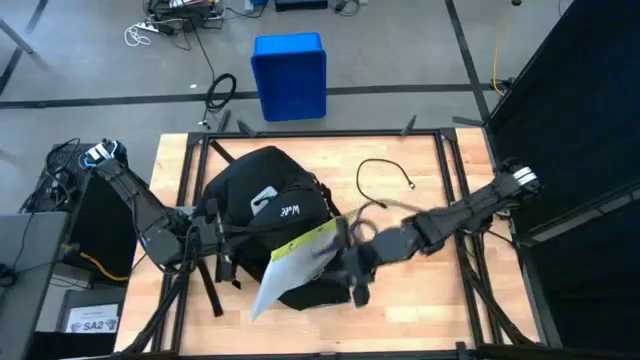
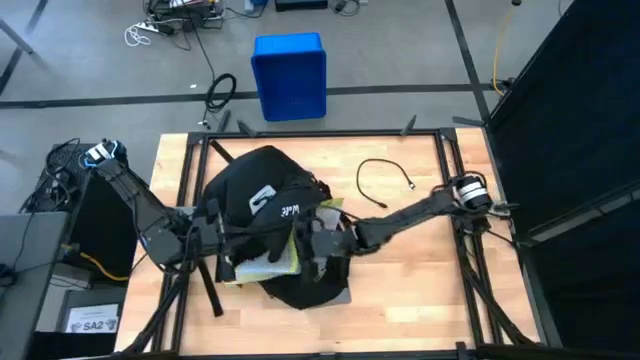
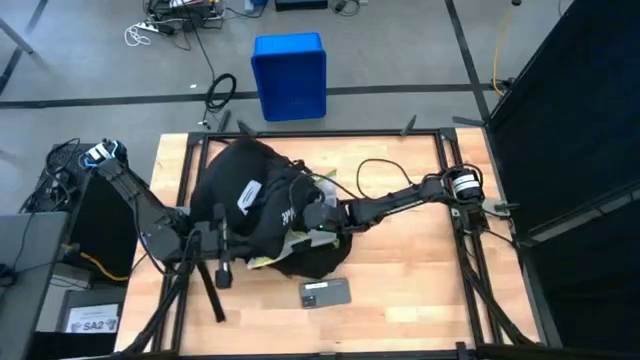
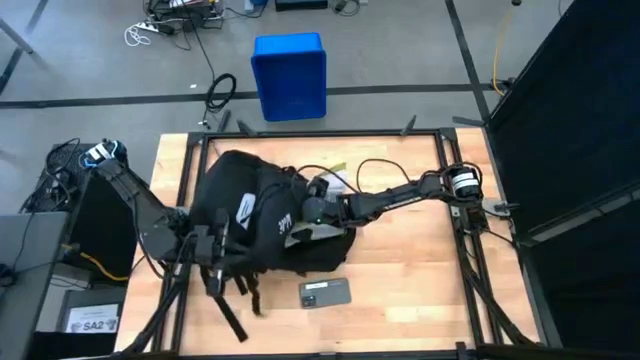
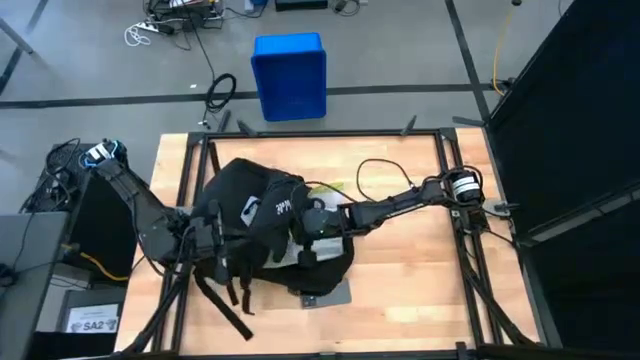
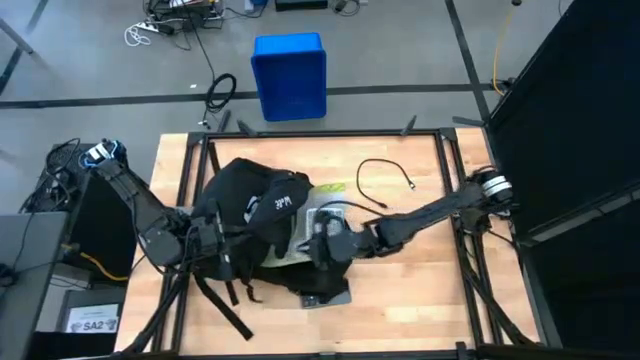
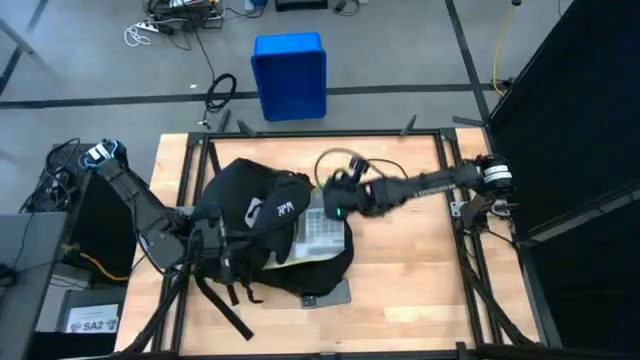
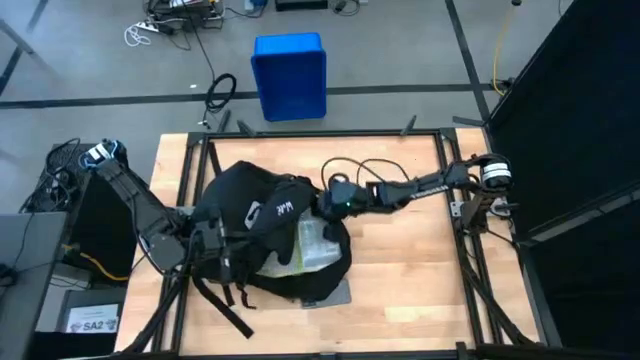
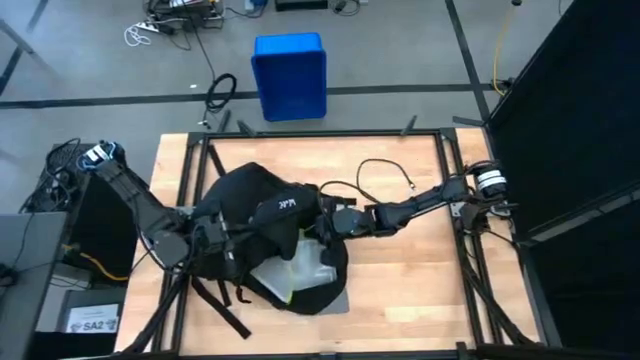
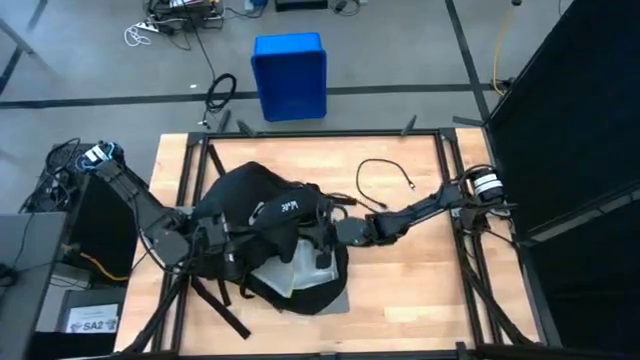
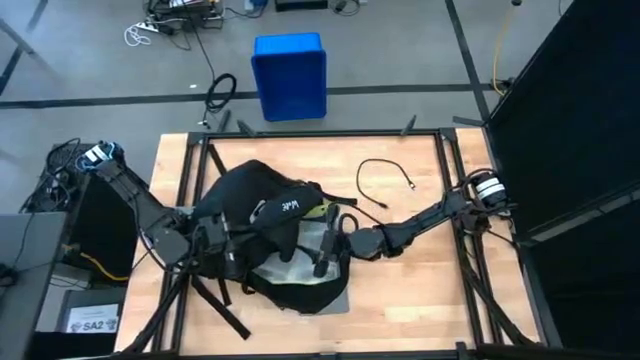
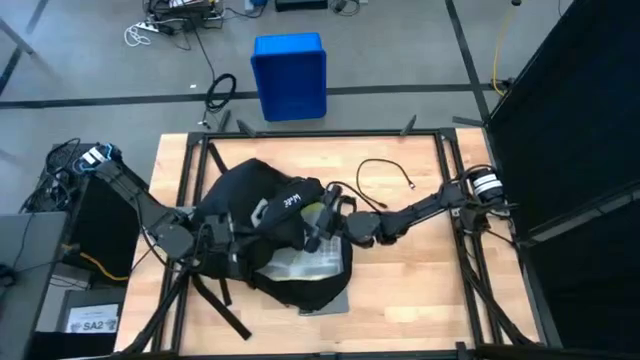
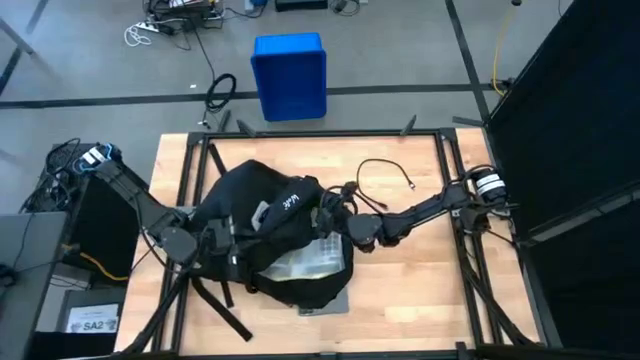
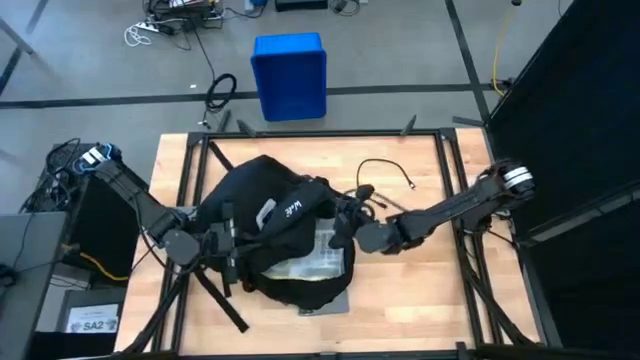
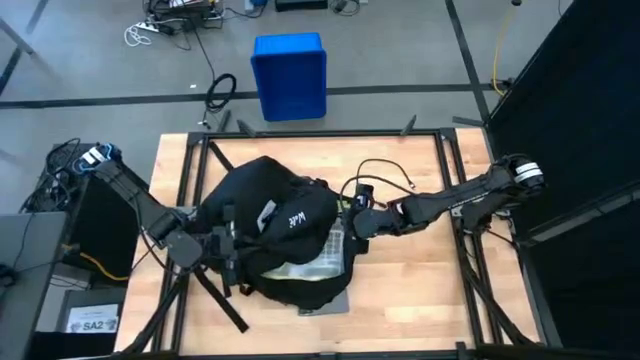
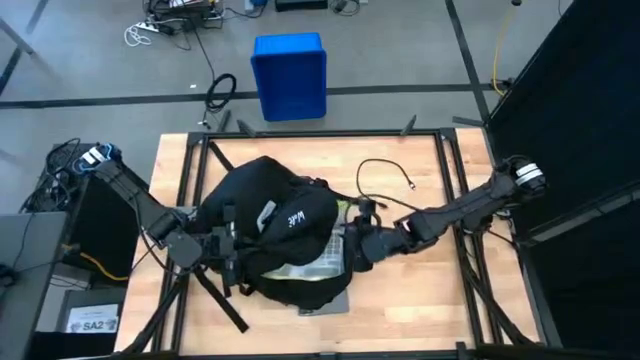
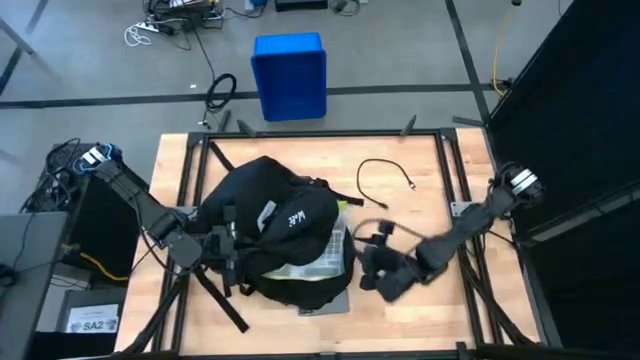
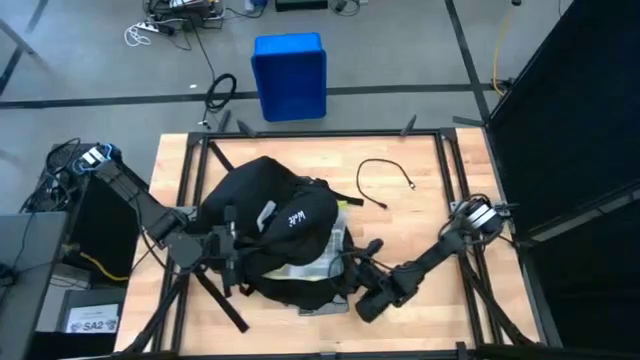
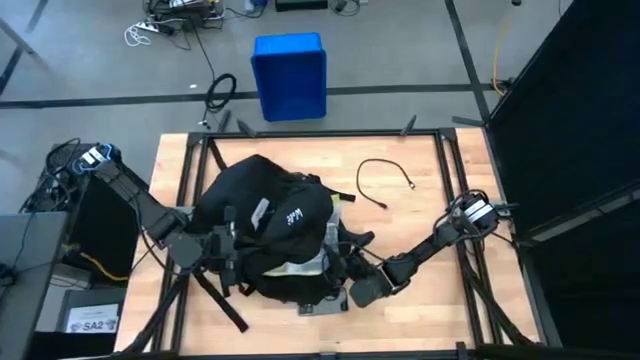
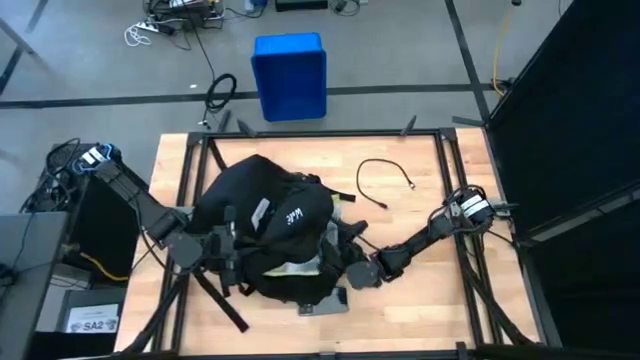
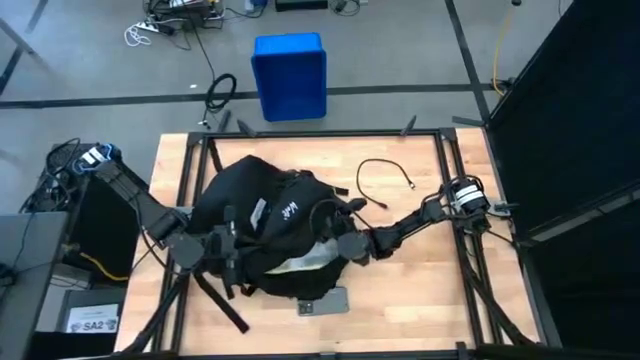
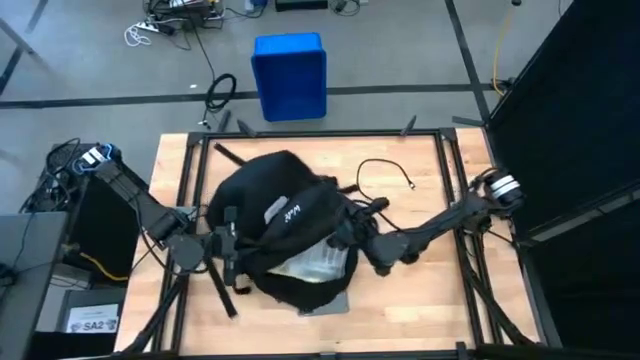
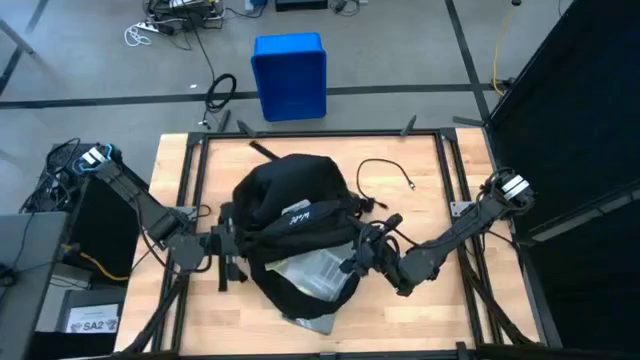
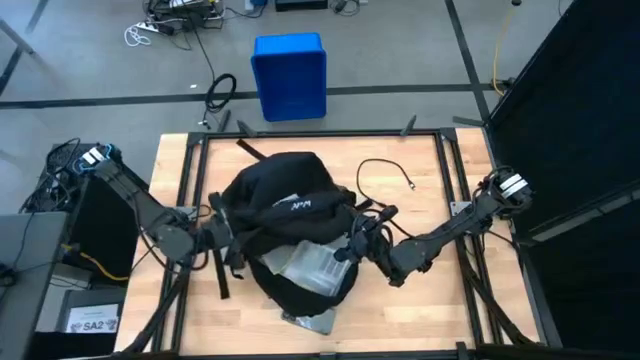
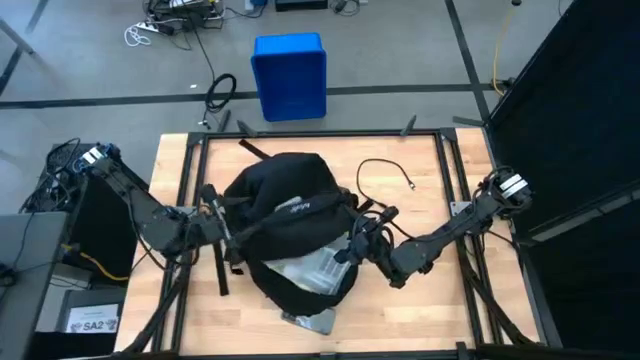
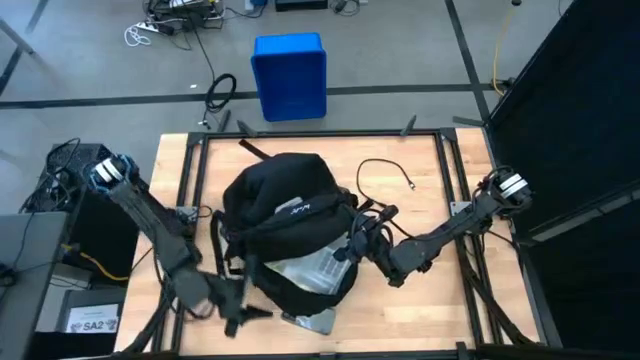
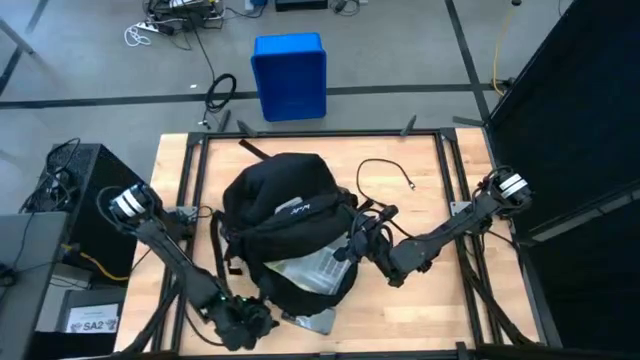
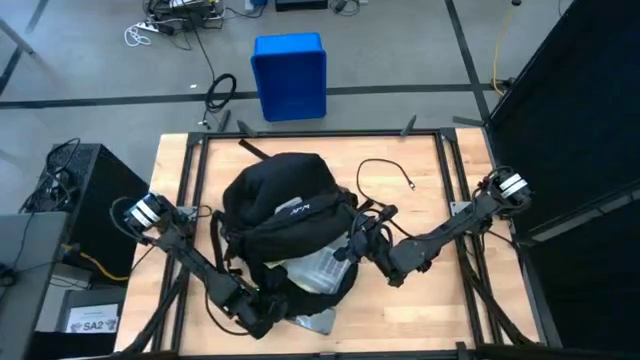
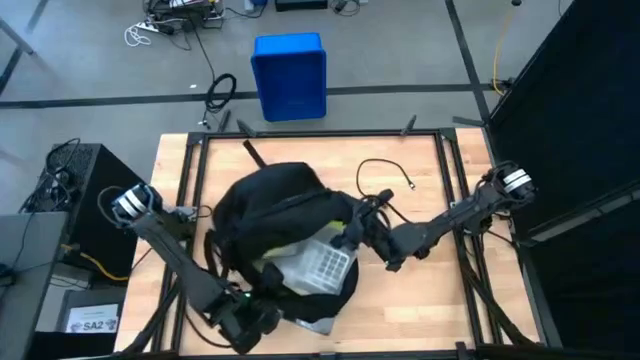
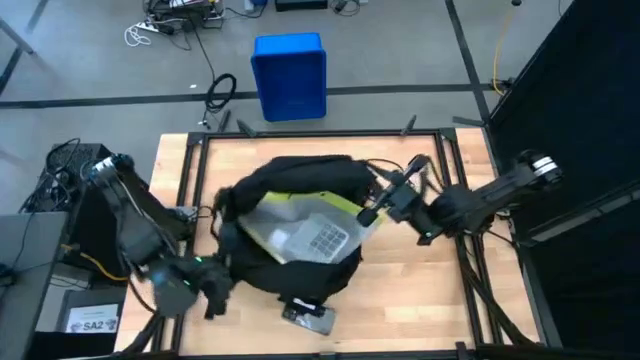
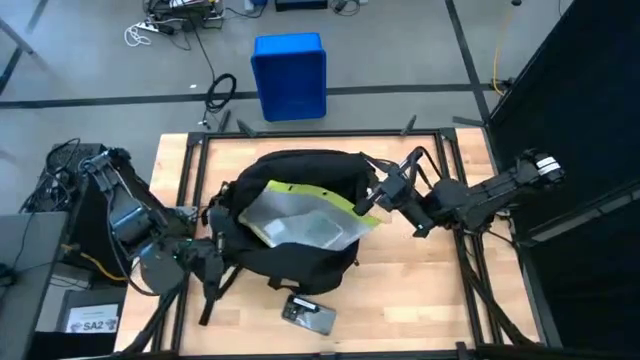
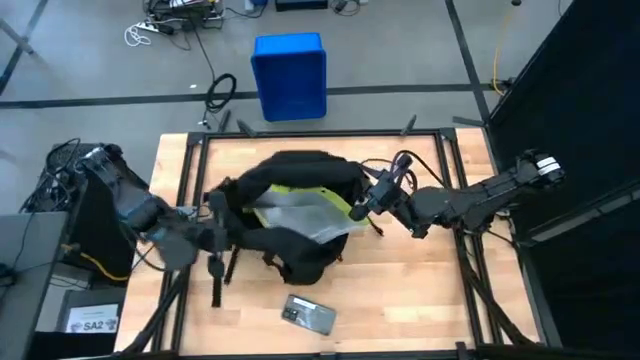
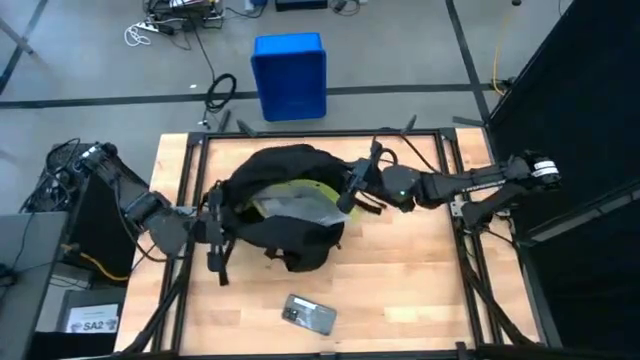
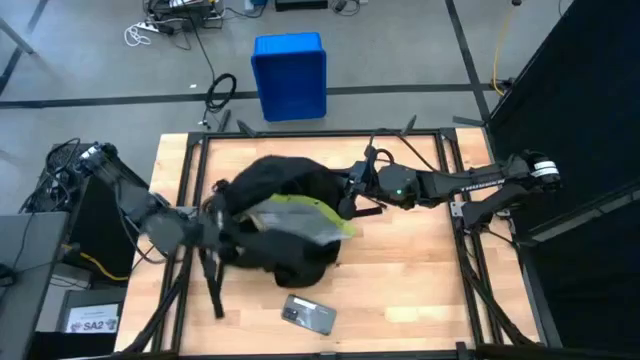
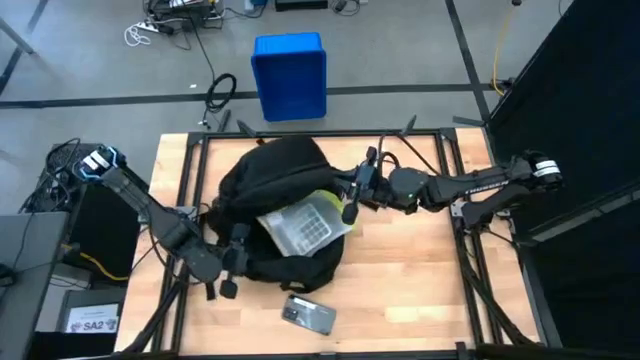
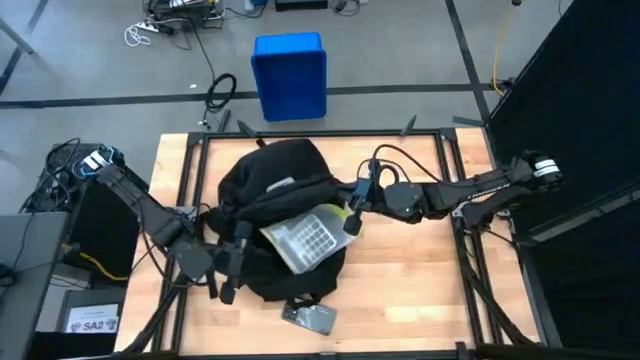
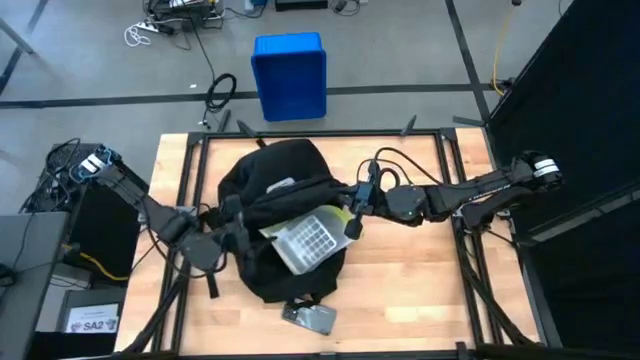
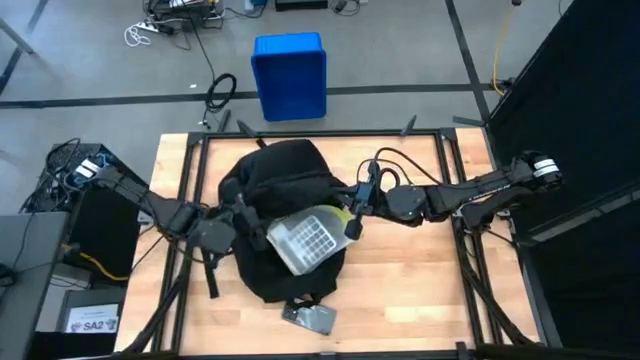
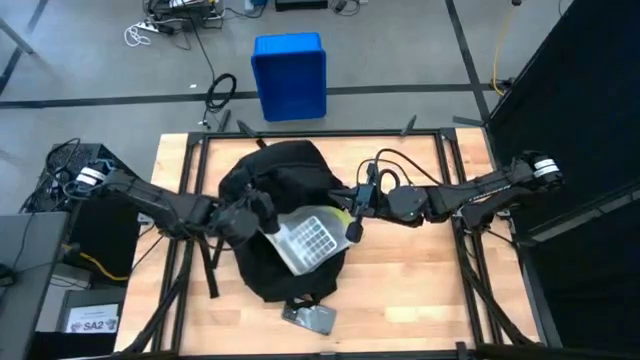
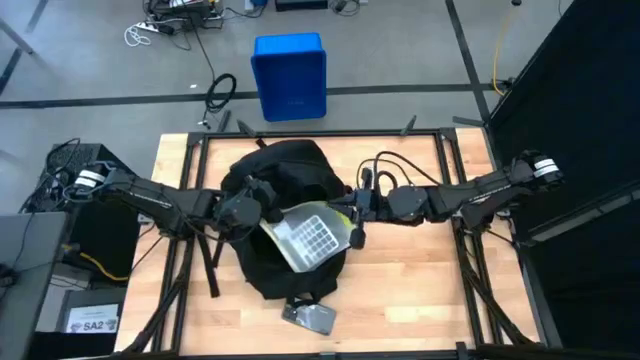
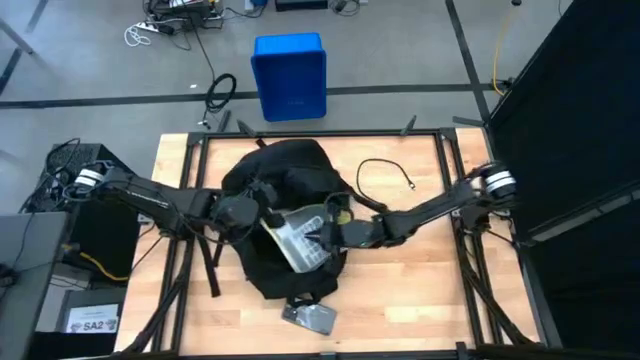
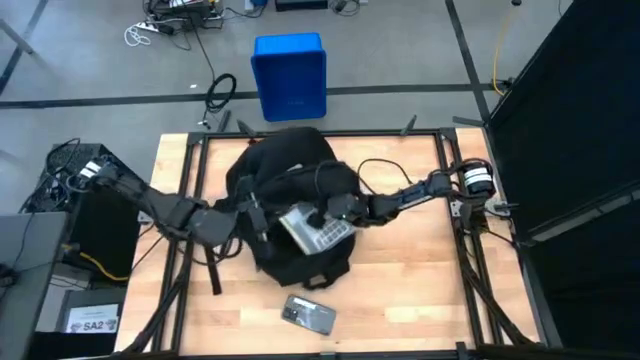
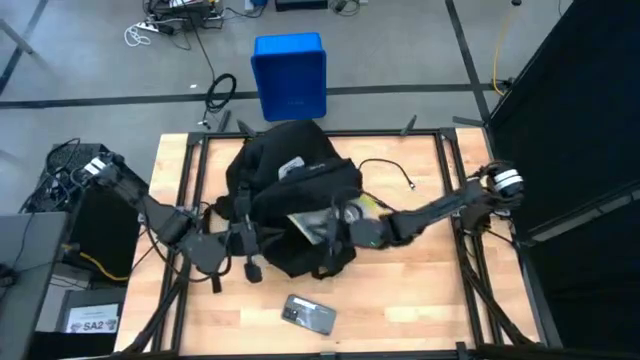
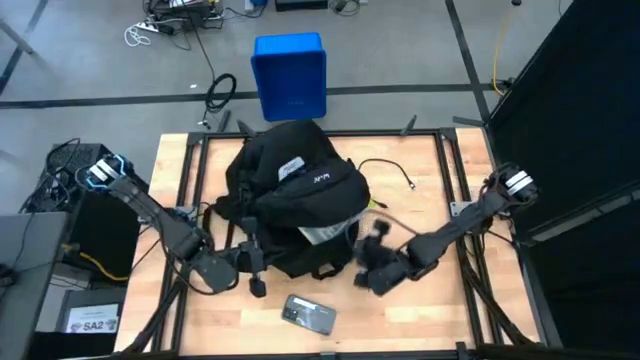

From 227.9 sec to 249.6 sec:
Task: Unpack backpack
Put the zip bag into the backpack
